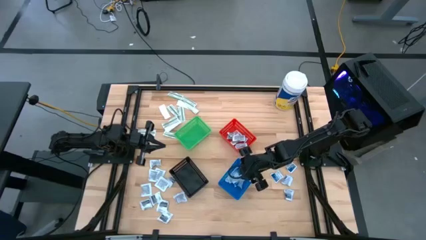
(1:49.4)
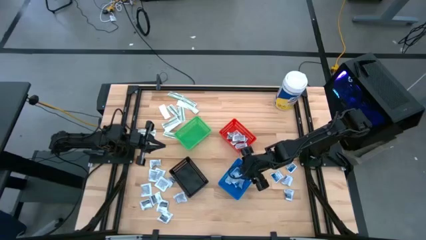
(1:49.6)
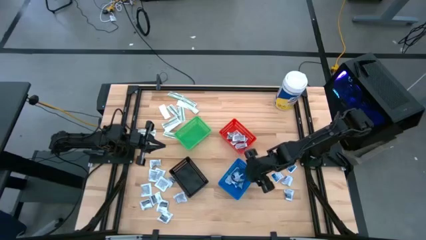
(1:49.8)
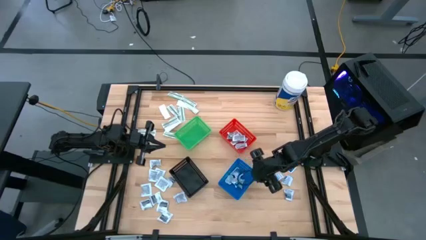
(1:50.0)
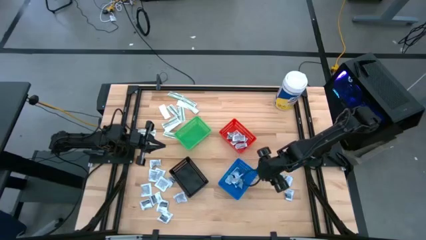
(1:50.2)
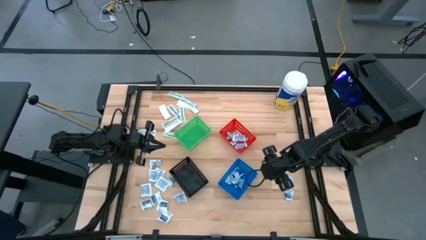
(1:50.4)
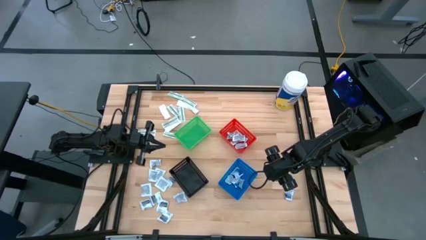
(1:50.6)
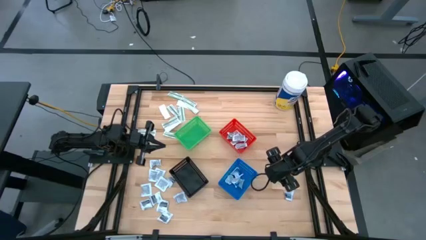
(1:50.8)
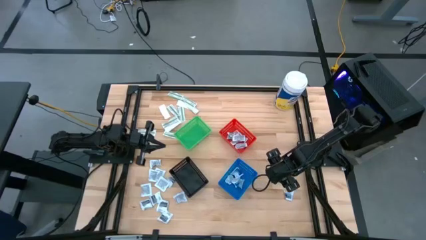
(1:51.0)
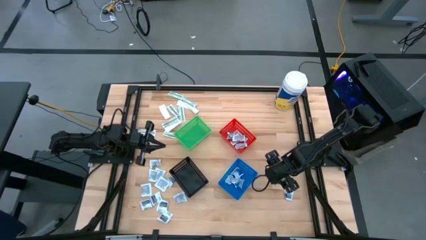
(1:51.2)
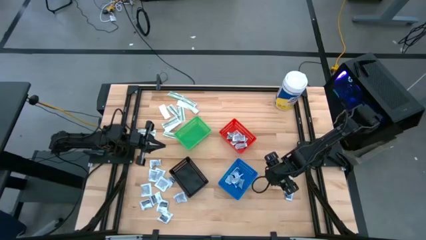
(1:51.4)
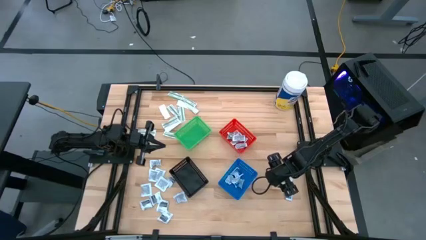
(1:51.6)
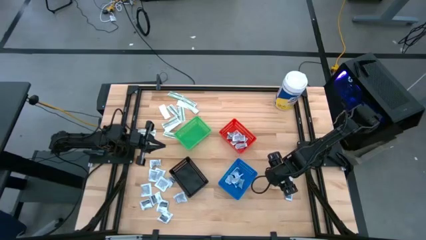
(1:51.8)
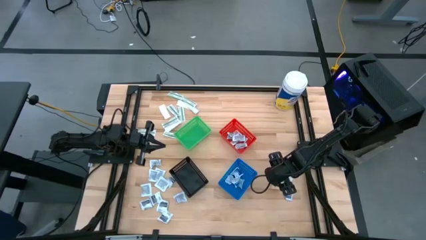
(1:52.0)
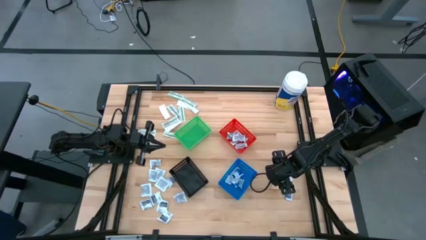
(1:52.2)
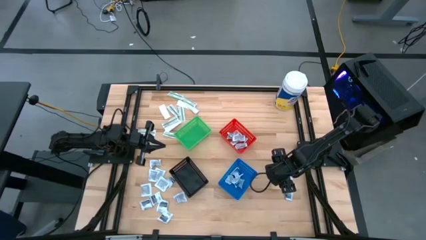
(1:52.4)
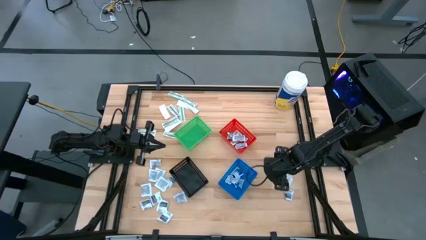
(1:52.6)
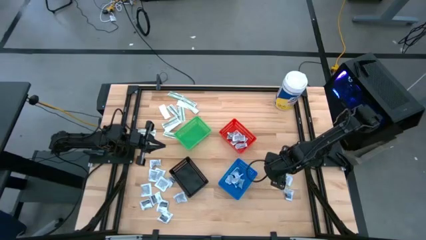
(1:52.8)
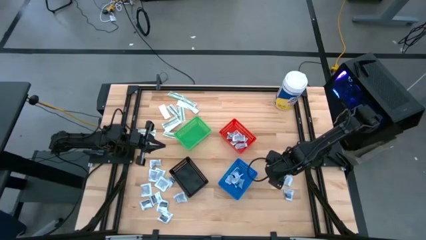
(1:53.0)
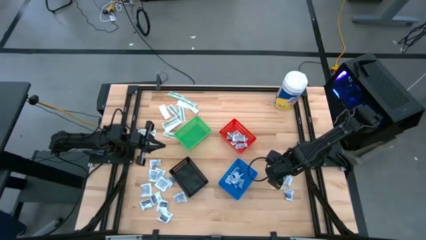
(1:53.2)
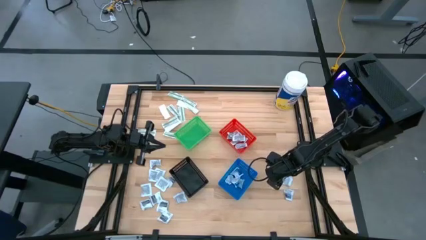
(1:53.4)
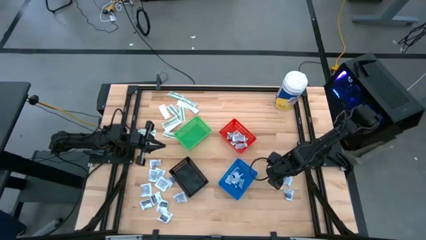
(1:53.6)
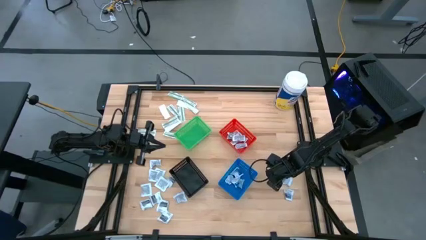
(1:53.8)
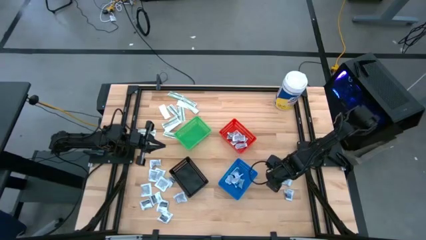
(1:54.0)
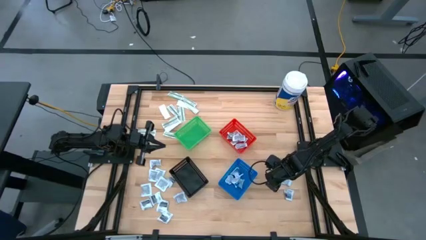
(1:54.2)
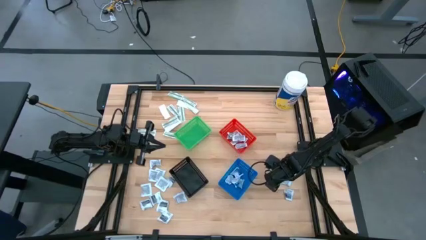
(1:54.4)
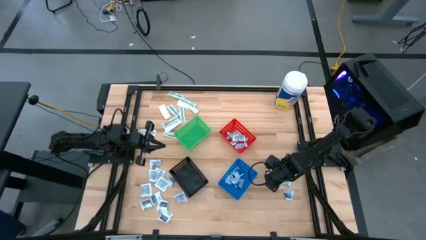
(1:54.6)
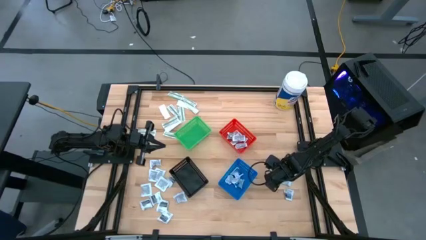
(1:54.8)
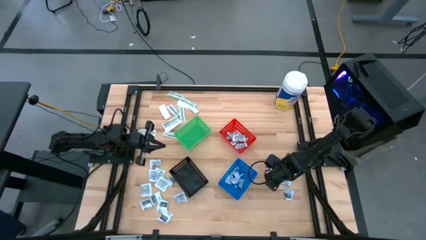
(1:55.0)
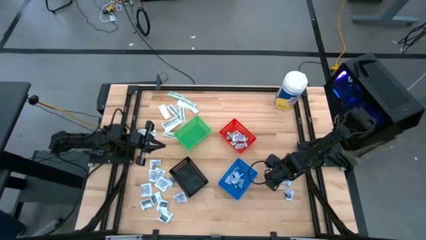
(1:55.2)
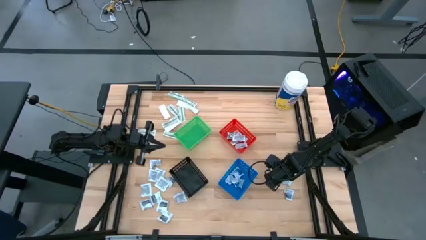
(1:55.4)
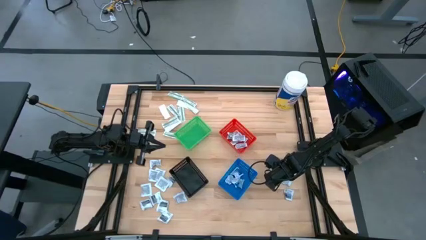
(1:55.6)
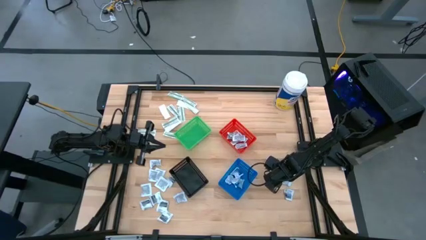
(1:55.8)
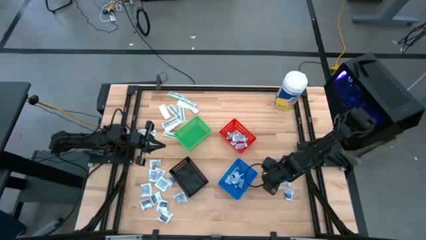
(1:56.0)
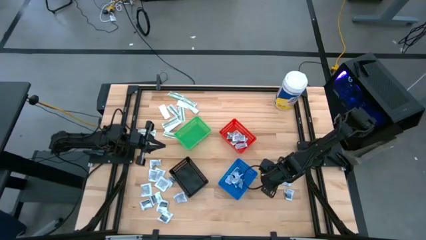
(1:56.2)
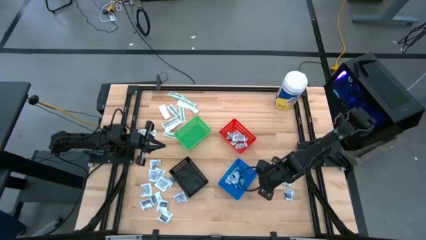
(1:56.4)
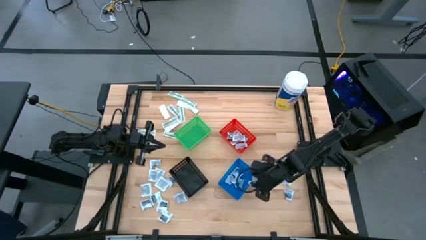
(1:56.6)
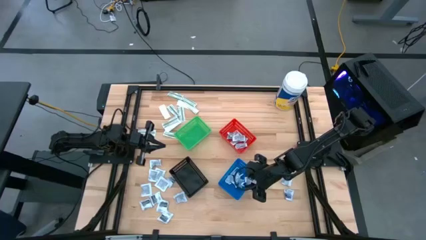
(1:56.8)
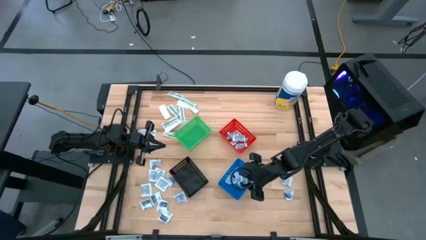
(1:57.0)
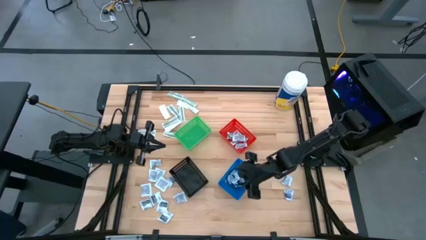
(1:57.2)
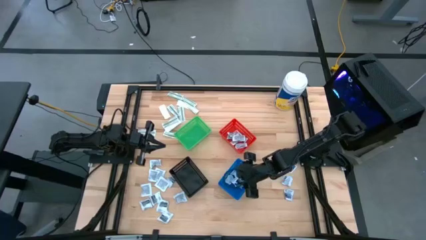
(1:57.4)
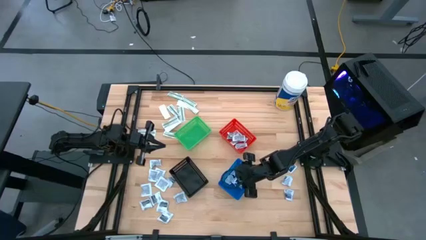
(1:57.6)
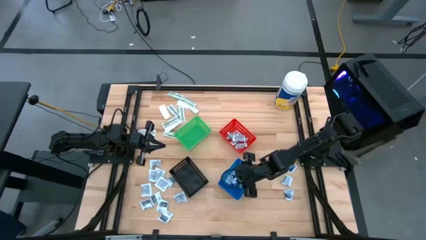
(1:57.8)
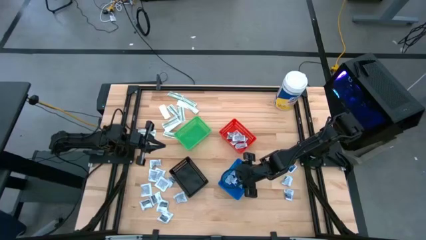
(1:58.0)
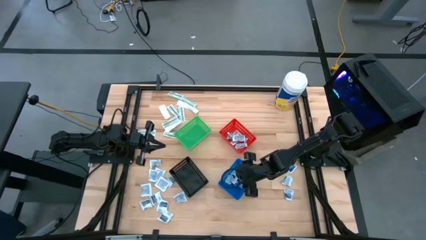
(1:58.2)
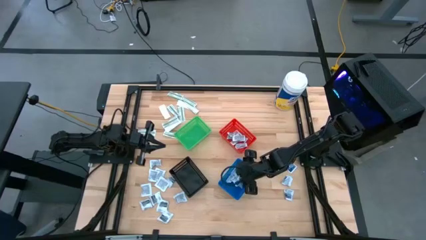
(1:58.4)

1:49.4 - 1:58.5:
Task: Pick & Place First Aid Supplies
Put the blue alcohol pad into the blue bin

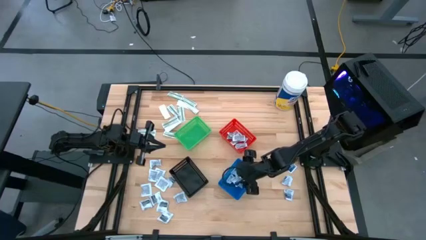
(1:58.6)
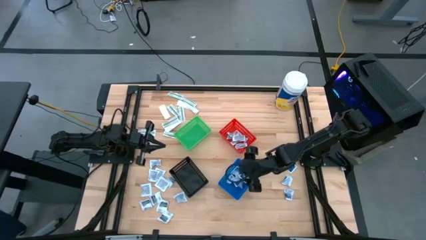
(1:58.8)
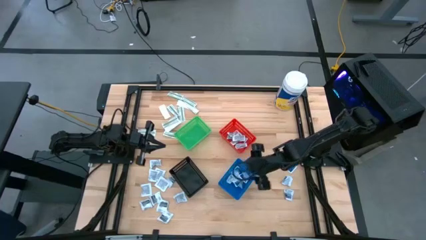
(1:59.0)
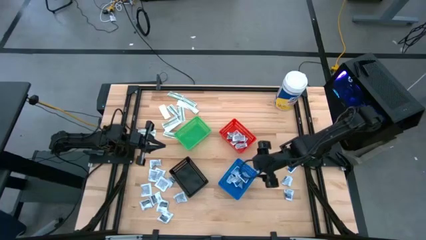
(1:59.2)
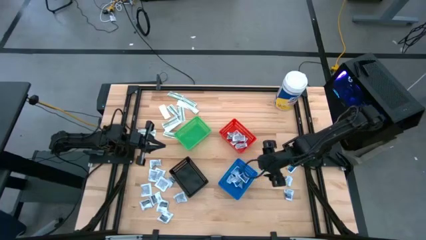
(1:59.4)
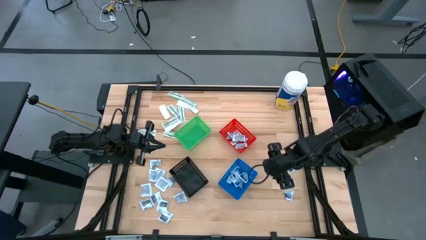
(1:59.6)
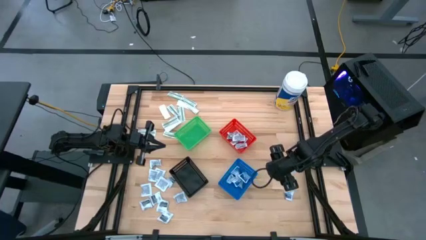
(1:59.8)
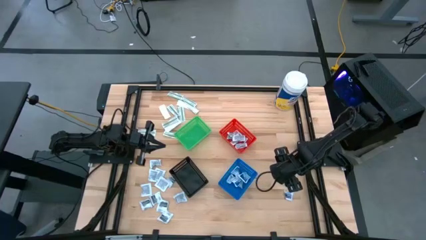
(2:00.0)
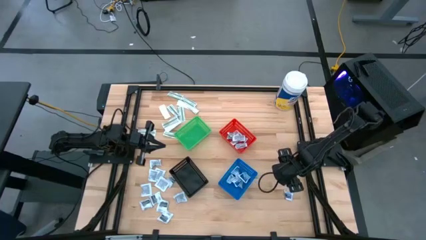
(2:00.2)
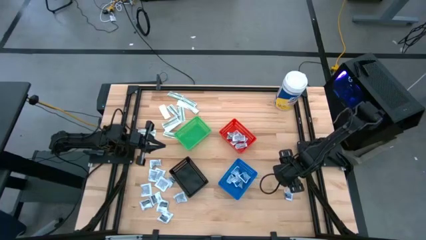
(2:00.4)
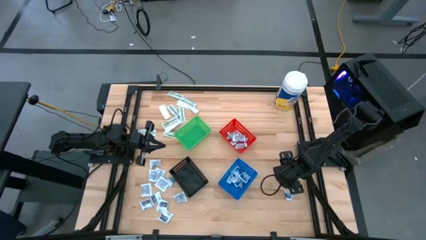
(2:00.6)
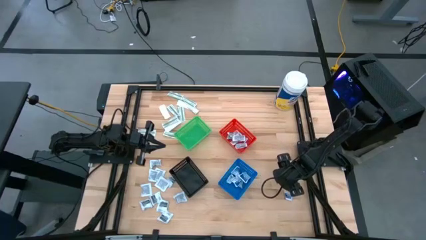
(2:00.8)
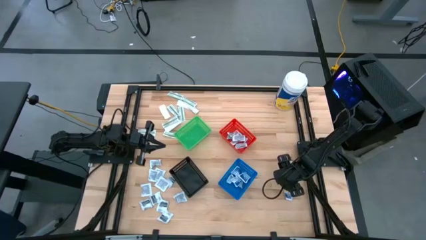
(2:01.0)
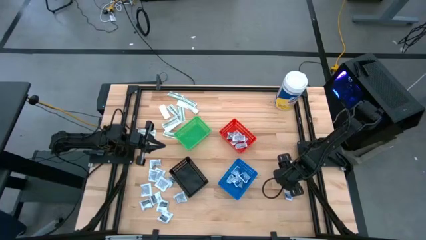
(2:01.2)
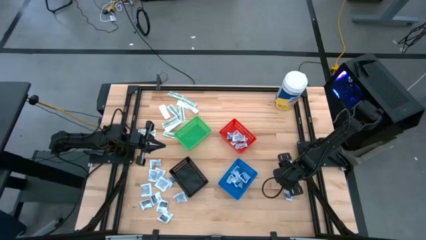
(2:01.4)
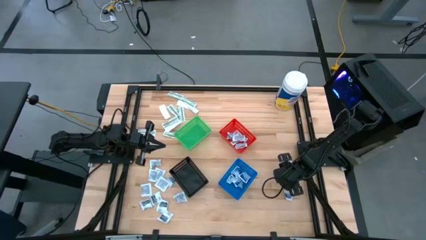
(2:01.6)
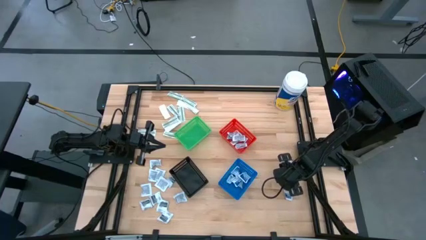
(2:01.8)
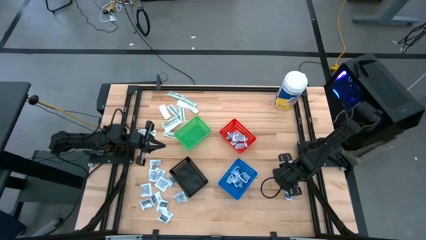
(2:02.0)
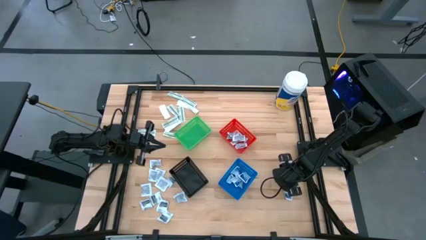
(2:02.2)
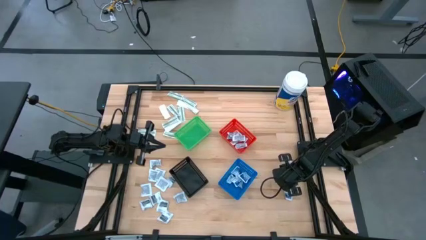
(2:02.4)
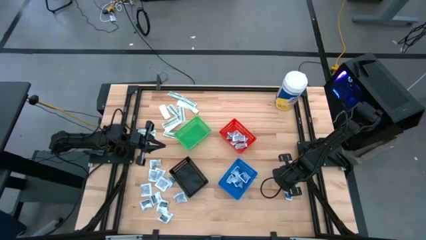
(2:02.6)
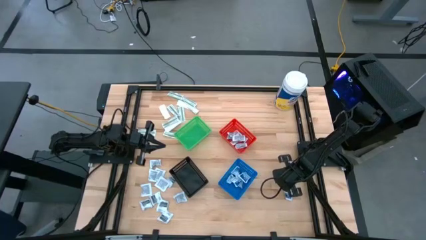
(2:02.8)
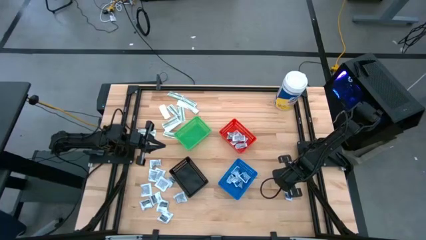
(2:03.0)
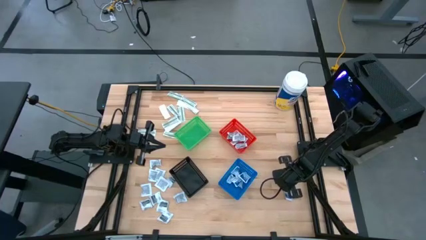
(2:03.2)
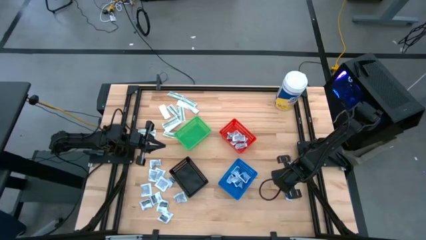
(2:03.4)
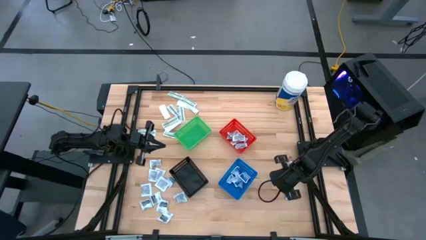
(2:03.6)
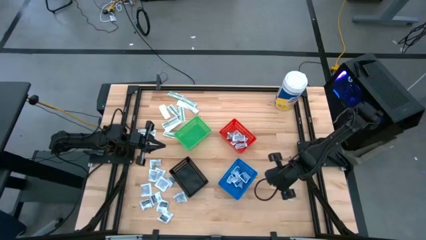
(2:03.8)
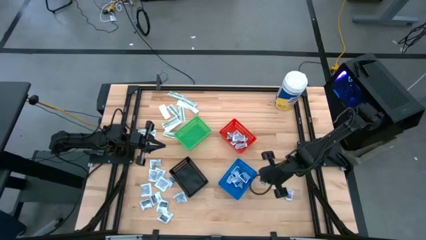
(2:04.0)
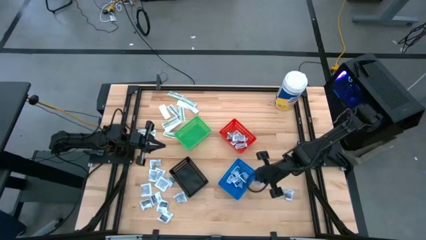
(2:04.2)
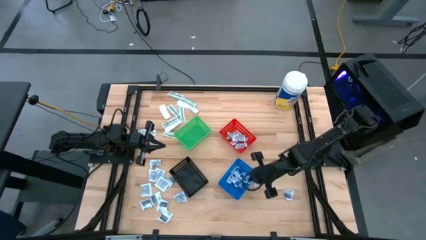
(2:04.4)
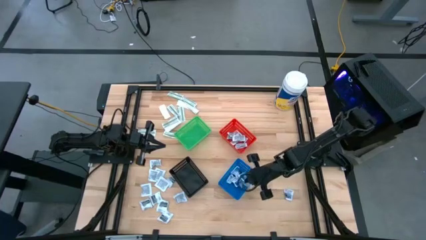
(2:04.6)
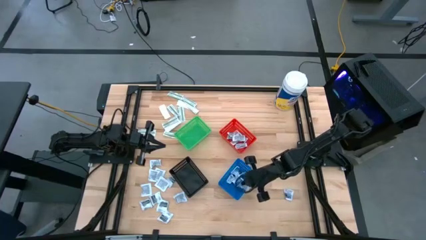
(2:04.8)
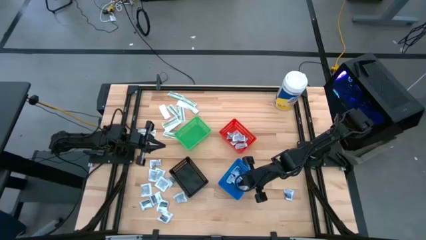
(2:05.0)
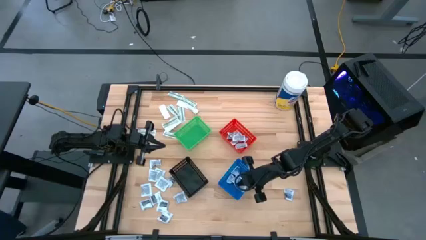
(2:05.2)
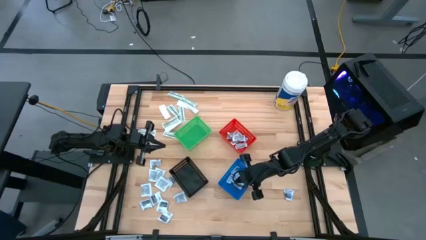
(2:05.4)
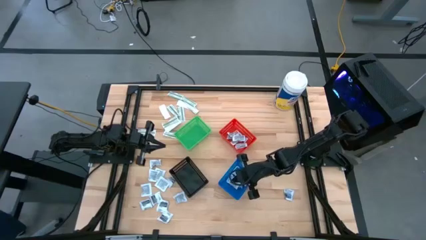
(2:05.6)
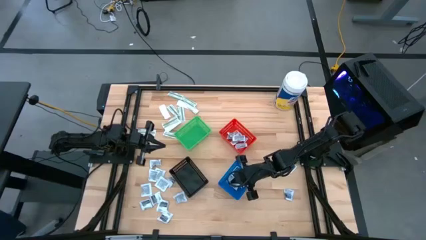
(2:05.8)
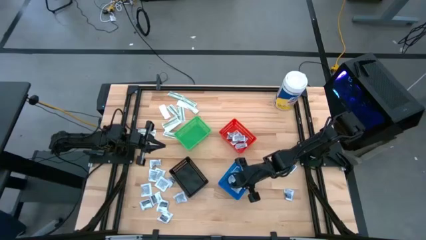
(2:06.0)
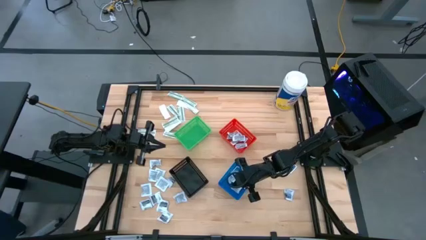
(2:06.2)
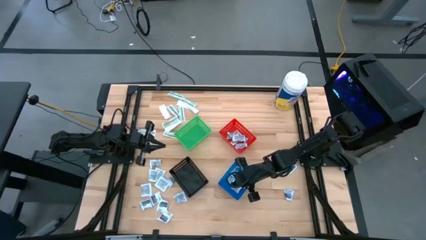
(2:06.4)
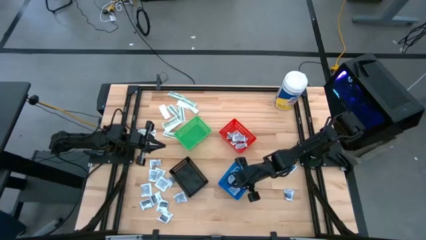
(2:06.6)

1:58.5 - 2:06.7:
Put the blue alcohol pad into the blue bin
